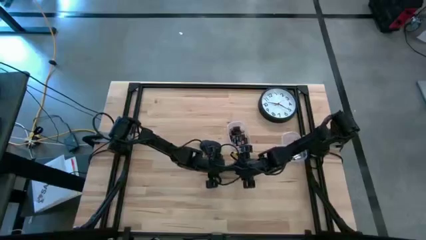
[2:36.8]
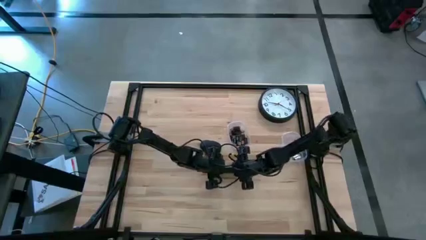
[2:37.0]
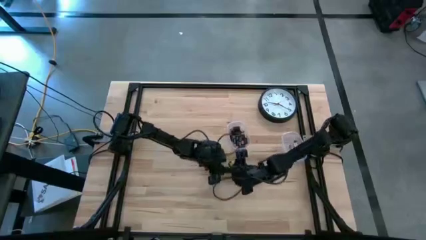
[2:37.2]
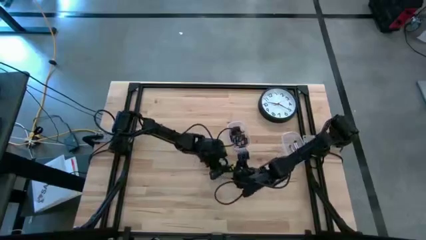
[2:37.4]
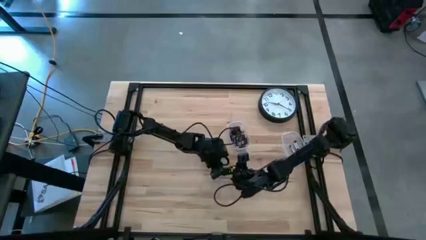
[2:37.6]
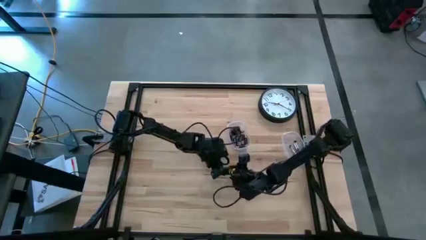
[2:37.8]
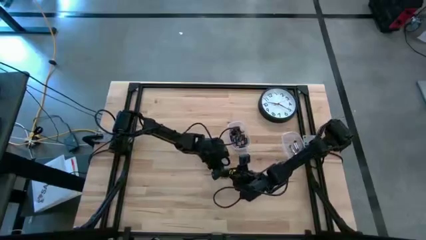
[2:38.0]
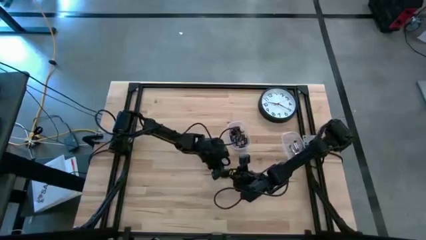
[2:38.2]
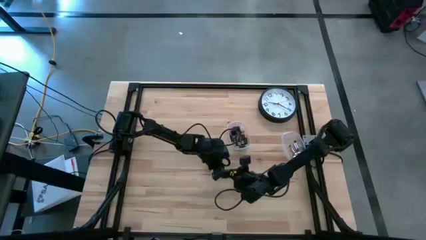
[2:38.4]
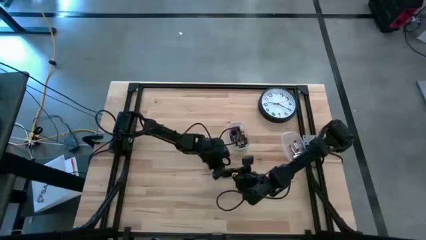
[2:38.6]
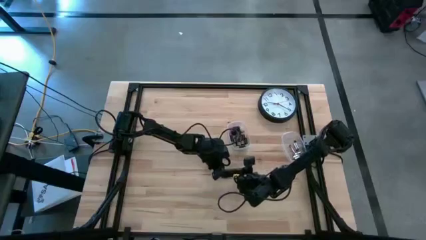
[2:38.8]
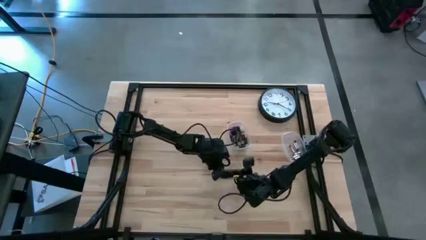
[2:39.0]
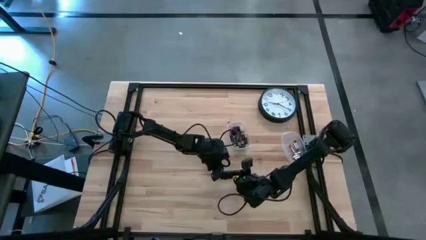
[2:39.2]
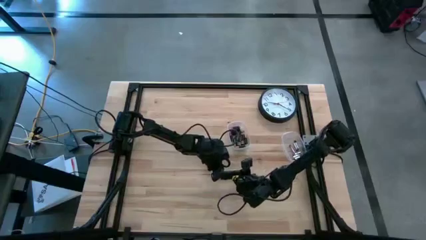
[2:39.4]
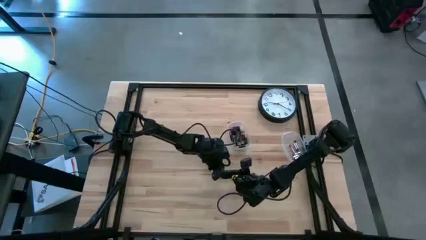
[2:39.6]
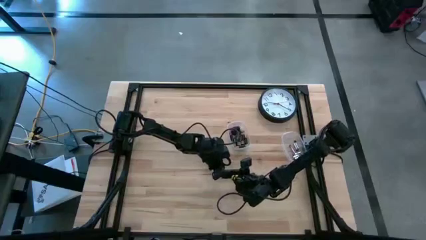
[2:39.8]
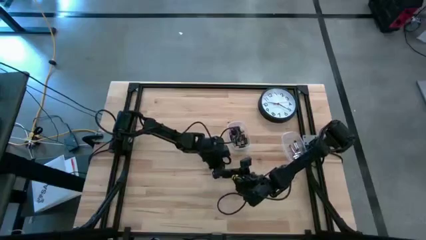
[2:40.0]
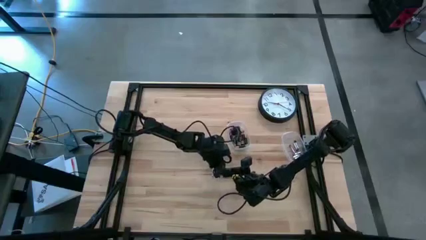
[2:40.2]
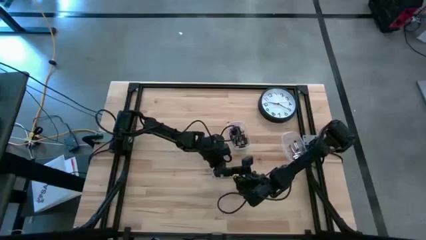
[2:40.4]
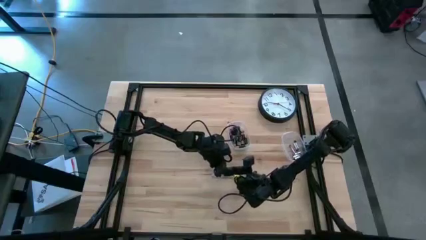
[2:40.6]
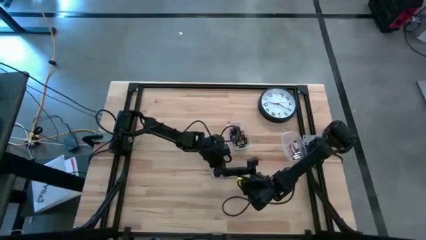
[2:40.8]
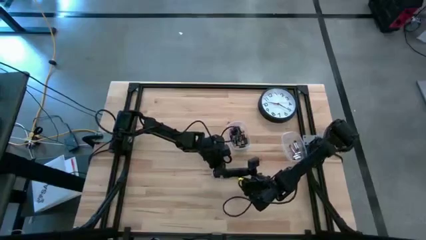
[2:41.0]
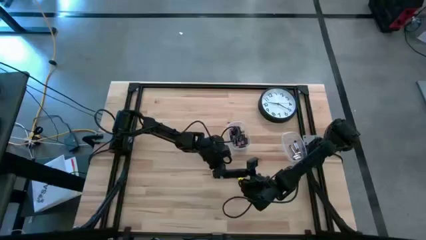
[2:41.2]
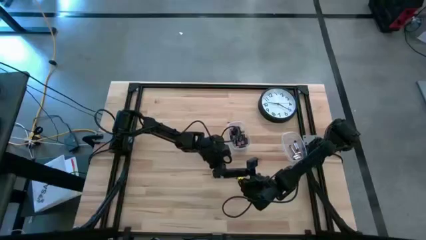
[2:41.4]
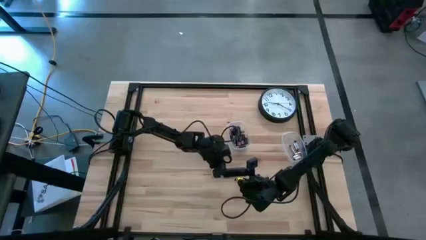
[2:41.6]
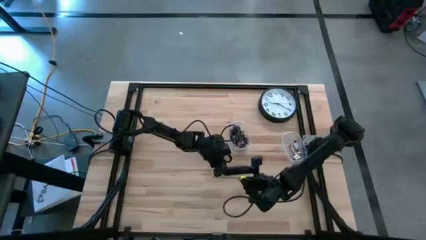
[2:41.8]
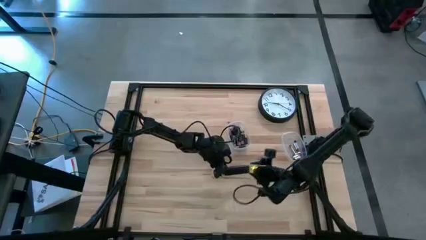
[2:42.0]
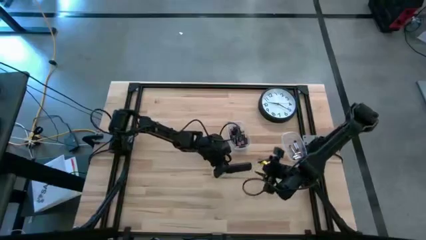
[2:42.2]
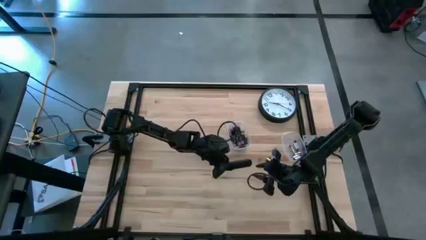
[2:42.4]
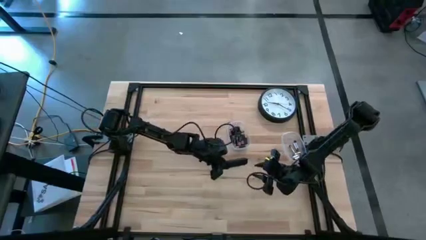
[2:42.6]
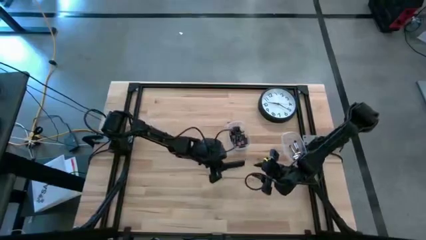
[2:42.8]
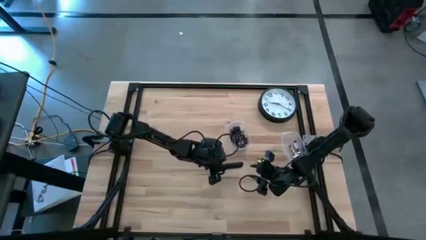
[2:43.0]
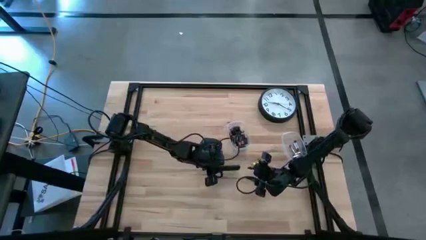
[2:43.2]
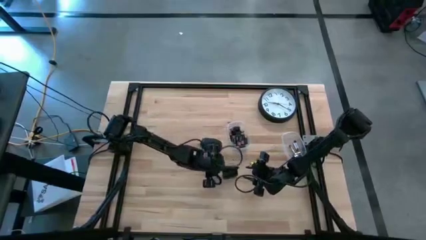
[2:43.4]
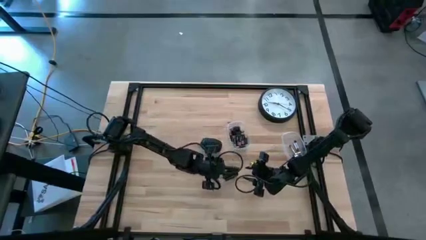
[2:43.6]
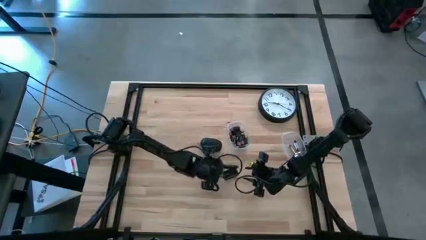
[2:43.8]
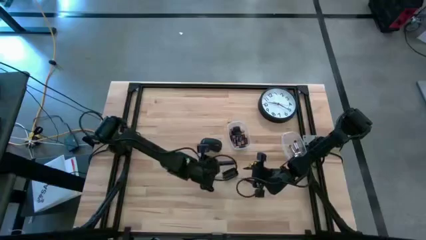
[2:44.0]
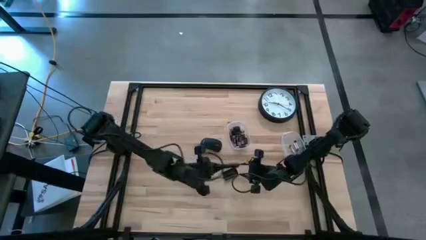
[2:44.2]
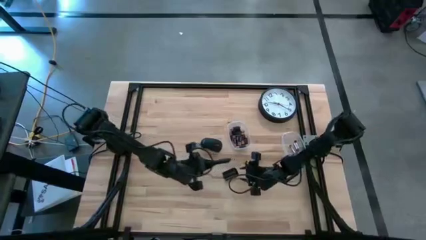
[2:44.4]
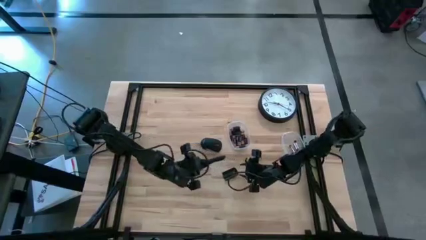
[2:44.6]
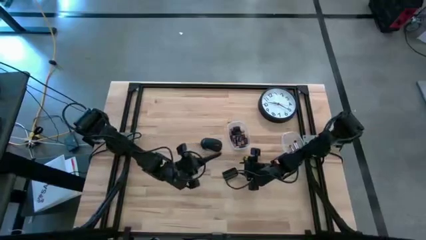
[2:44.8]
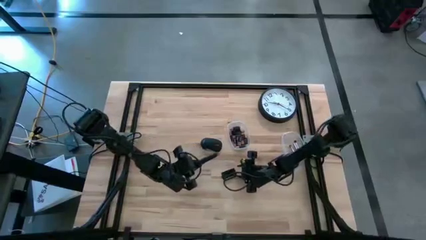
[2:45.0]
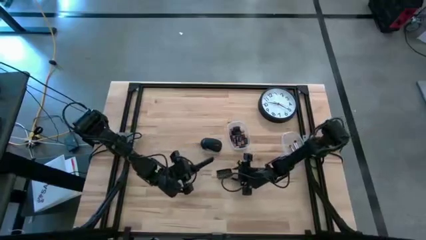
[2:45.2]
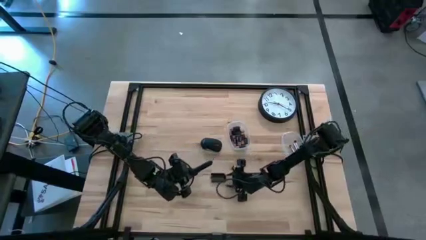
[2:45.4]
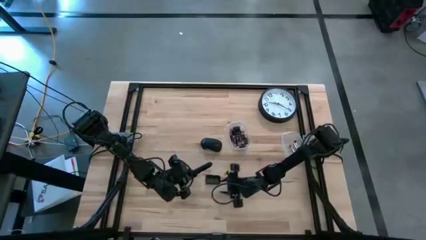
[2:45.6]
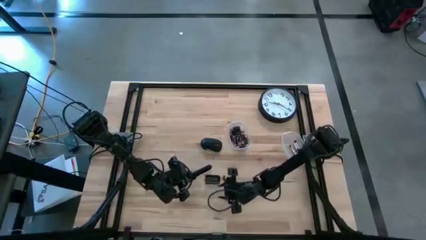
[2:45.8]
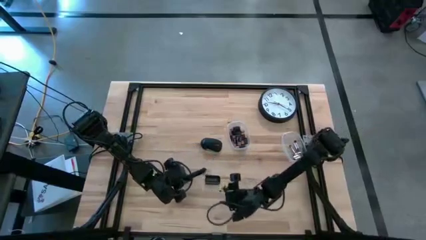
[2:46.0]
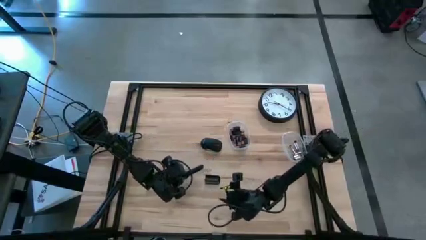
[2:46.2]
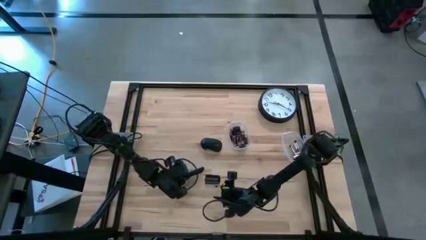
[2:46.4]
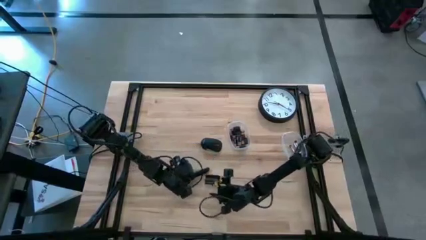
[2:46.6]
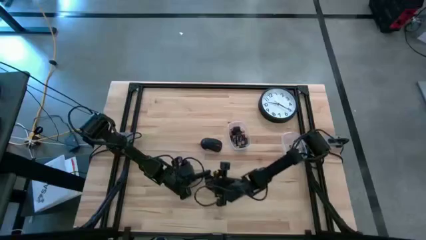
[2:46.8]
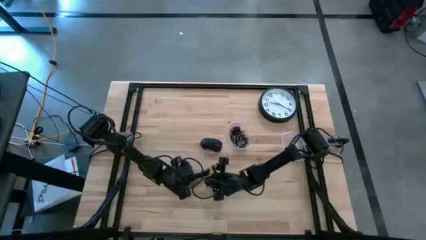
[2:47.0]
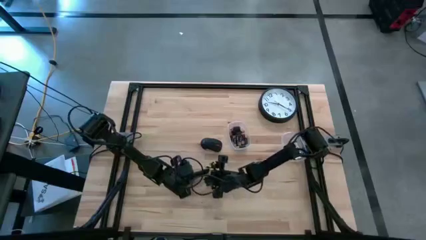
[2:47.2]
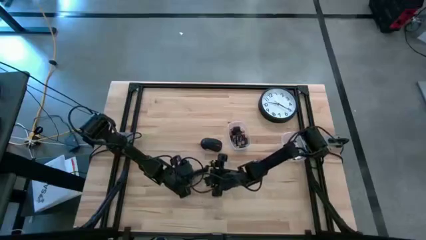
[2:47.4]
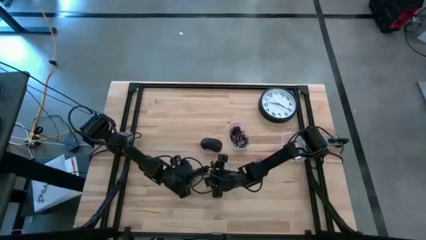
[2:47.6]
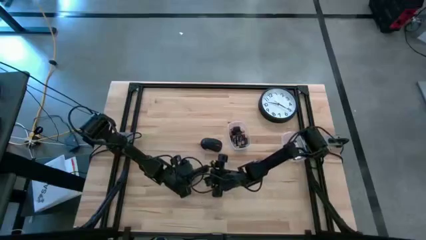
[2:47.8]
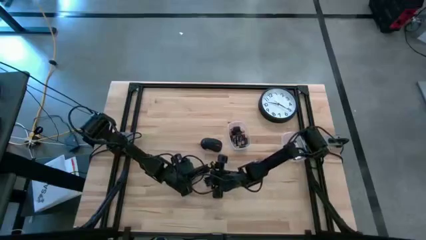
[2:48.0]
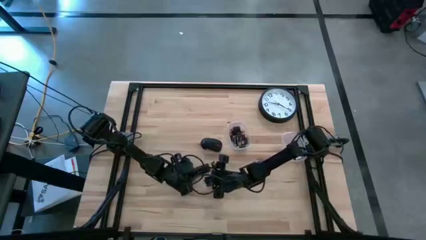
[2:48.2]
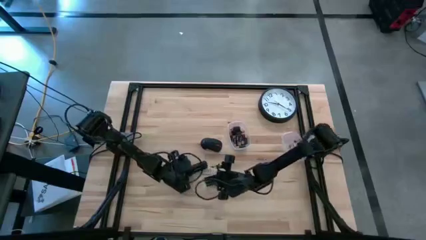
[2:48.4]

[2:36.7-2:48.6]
Task: Insert battery
Remove the black cover of the remote

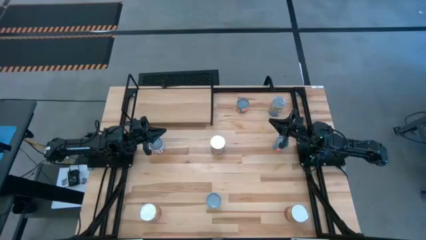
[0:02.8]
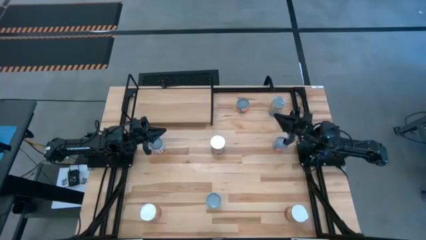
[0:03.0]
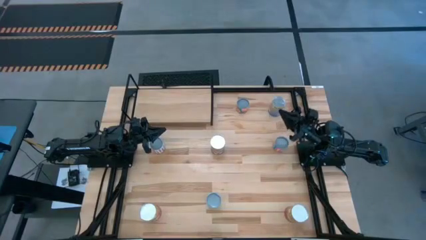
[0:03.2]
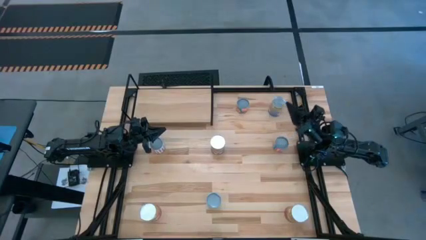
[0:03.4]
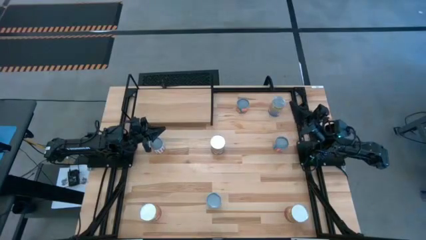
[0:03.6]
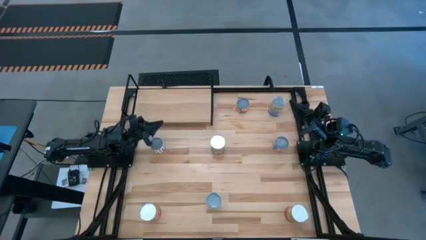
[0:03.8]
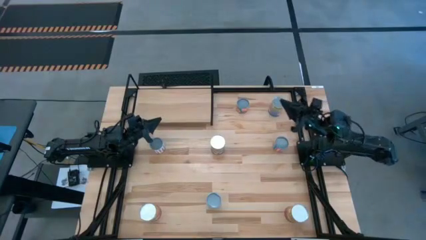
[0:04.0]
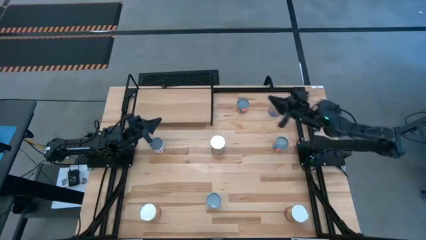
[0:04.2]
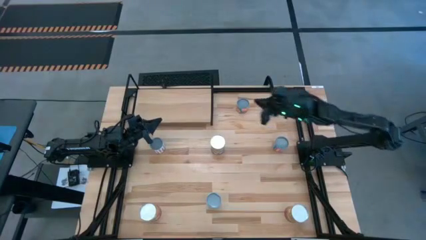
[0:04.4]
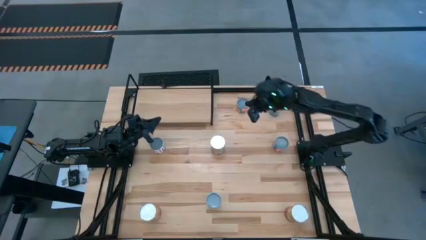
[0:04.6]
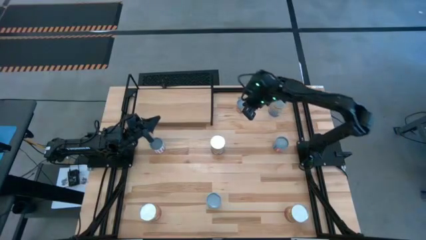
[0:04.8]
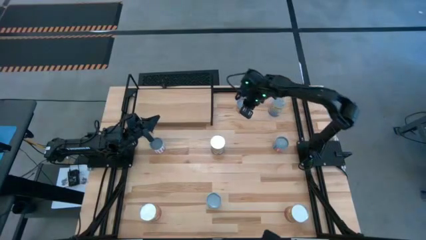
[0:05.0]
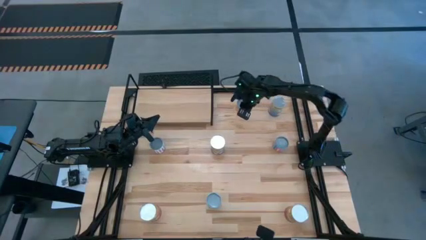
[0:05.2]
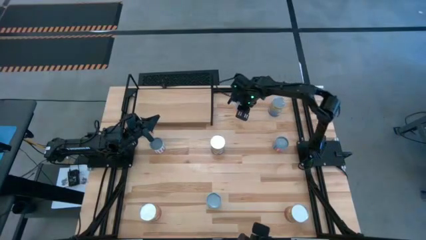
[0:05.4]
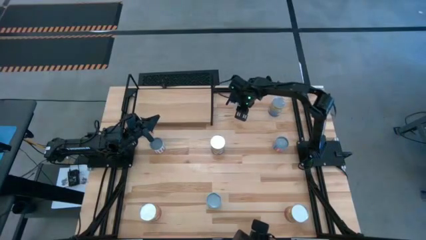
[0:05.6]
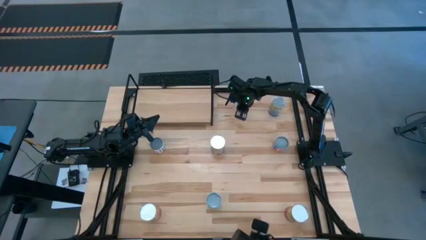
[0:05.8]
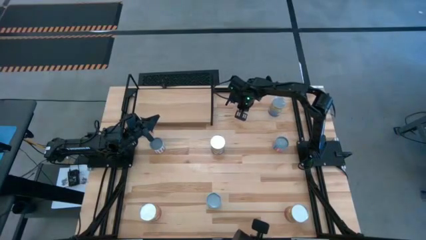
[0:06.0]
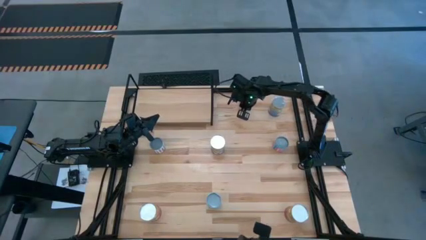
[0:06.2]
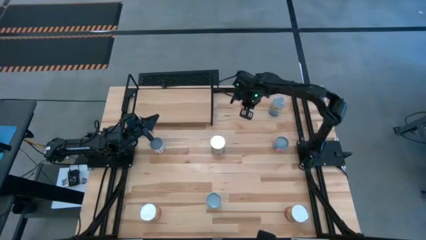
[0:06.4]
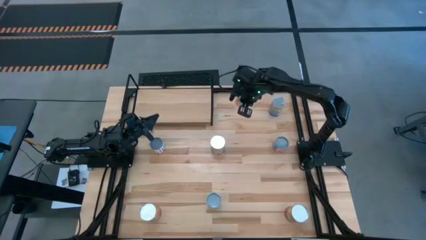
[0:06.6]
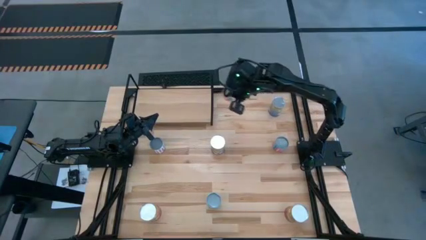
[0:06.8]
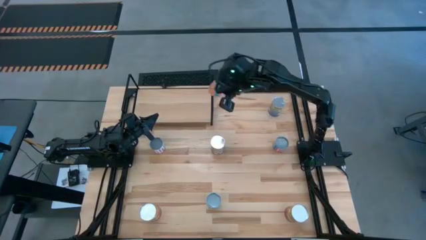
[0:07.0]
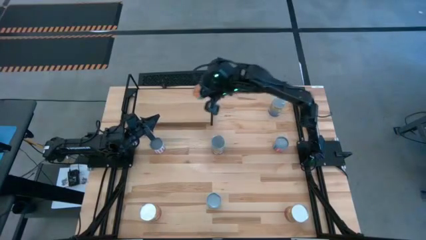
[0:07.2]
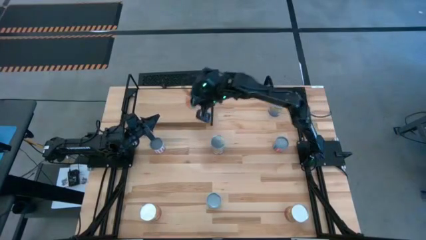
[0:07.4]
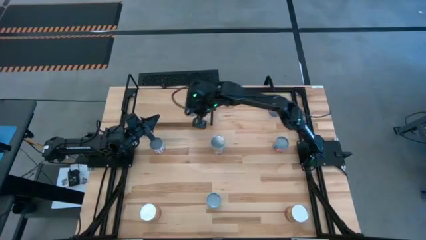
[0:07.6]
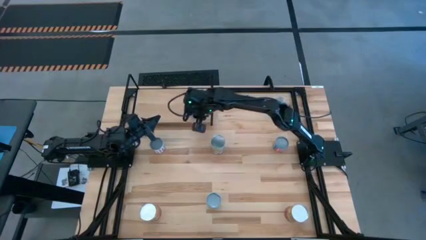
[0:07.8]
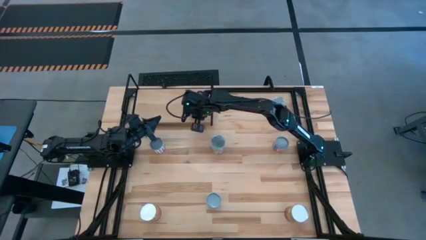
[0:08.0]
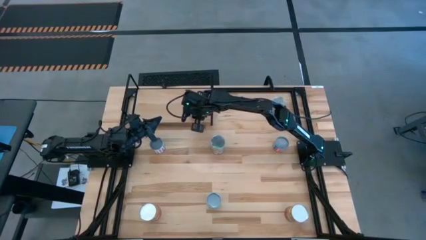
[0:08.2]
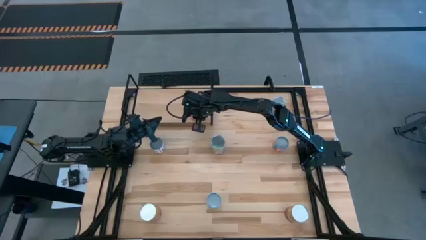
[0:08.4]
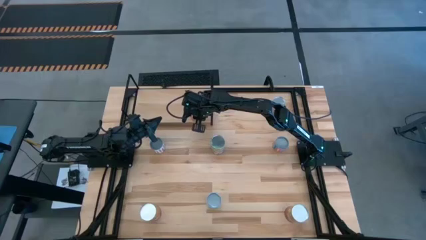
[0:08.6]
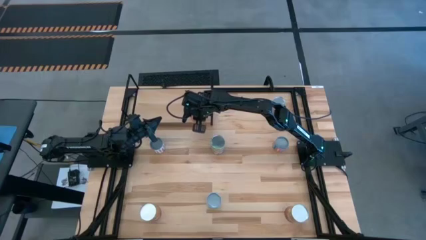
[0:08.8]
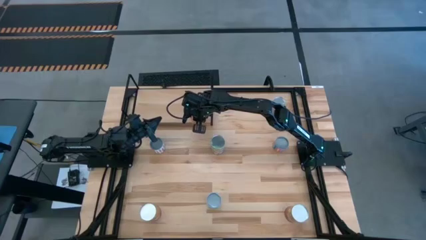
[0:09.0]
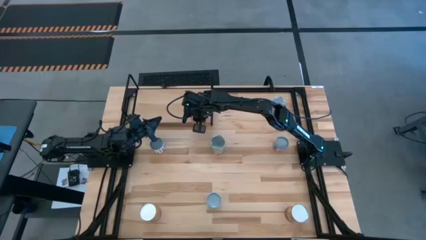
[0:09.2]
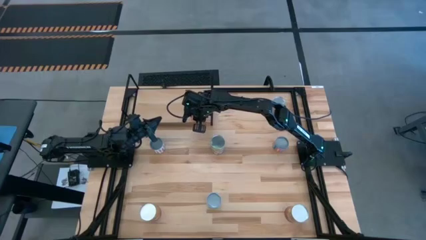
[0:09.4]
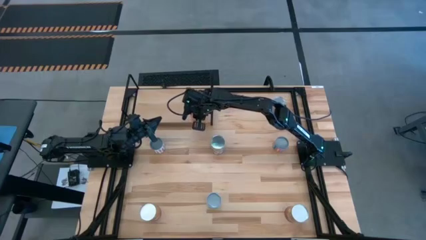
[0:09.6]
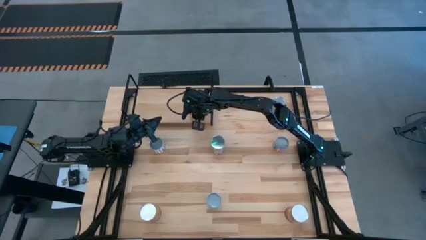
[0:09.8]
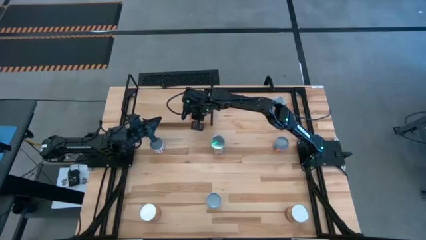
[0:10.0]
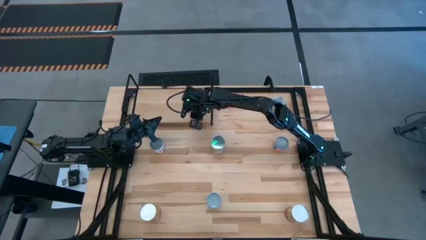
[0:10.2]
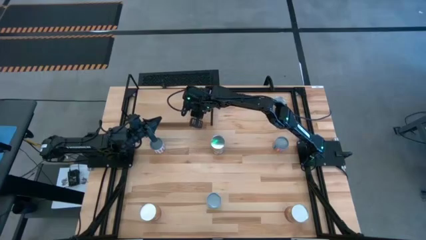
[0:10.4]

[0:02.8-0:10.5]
Task: Pick and place cans onto a shelf
Put the small canned oranges on the shelf
